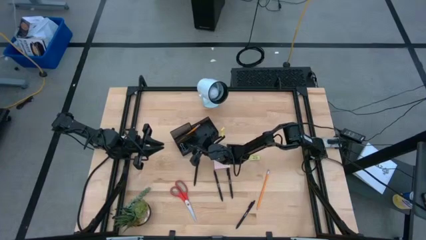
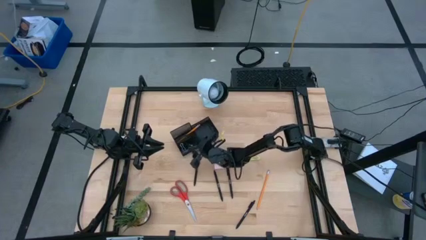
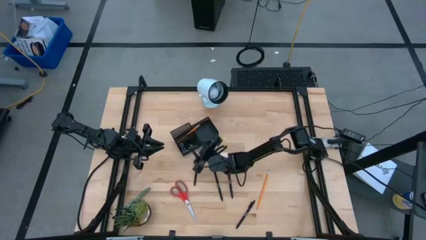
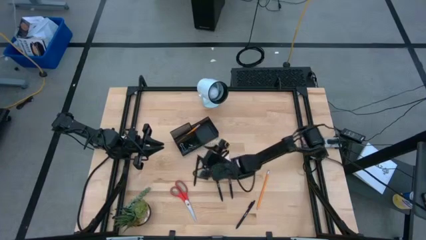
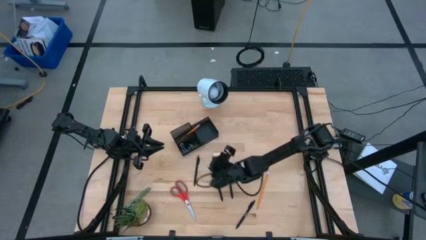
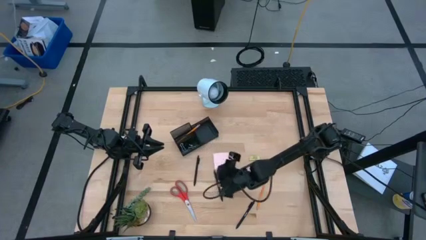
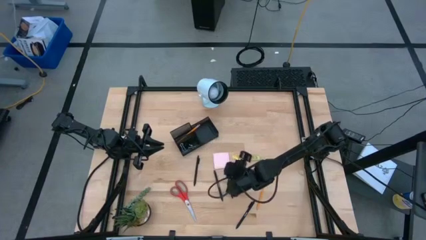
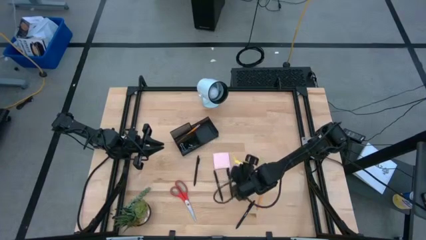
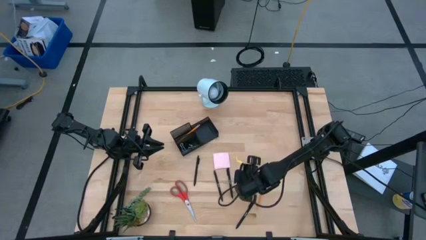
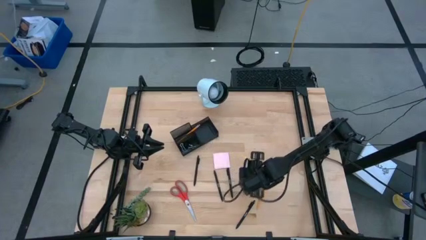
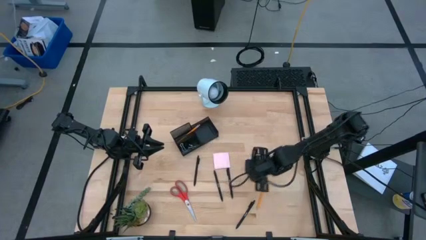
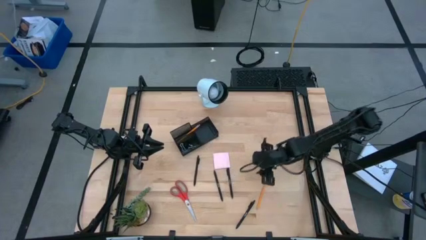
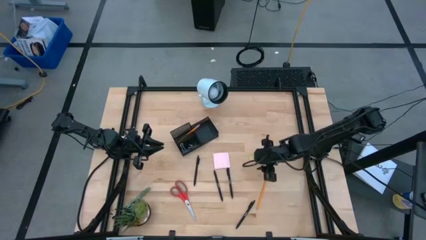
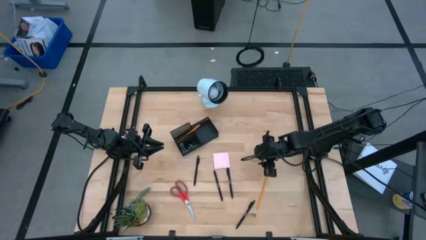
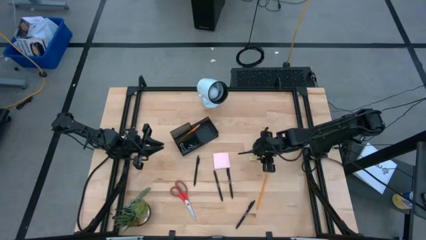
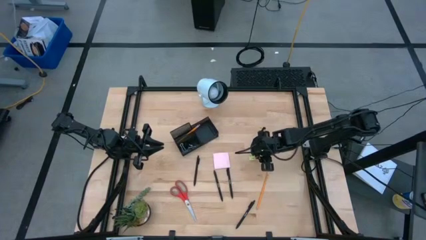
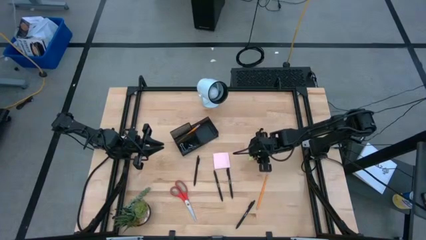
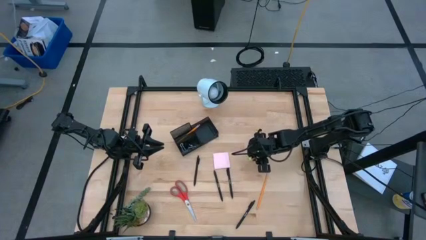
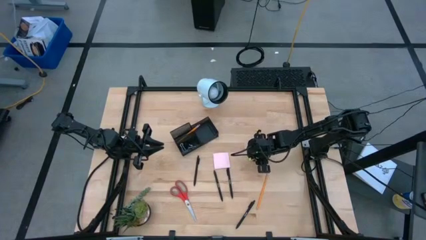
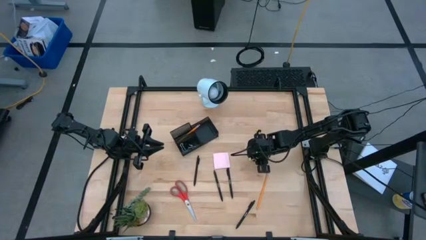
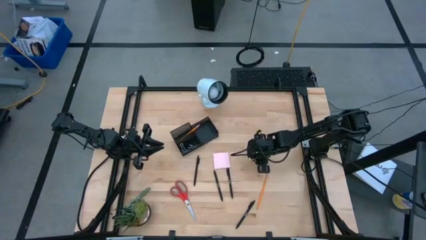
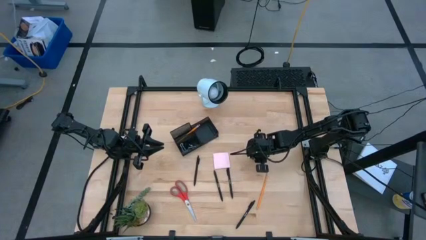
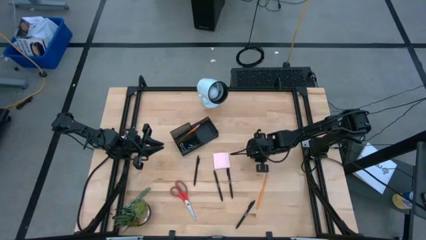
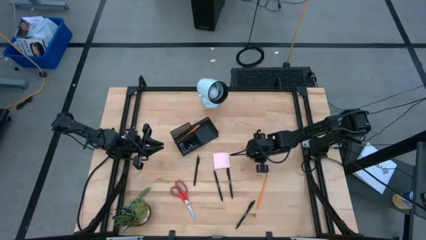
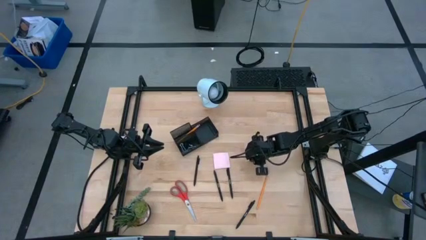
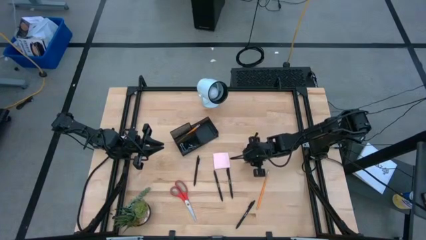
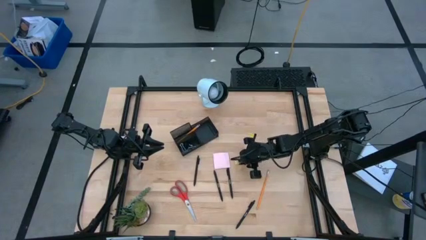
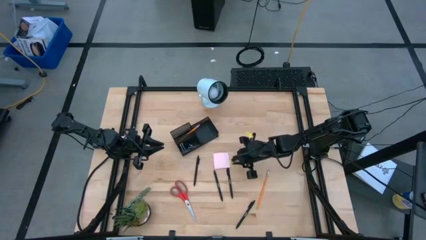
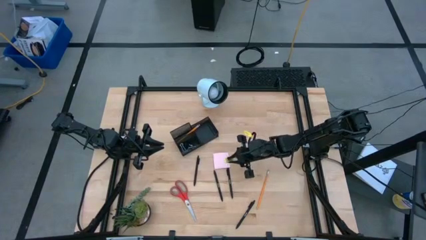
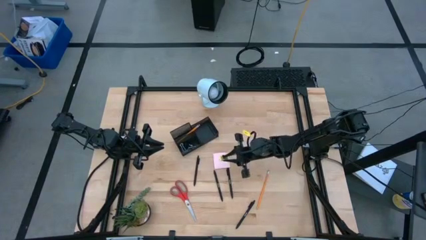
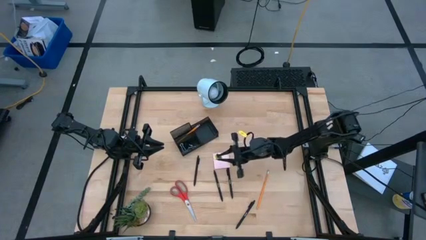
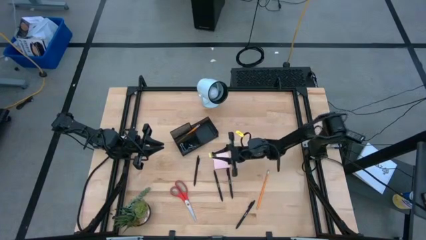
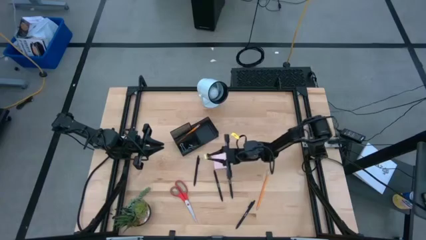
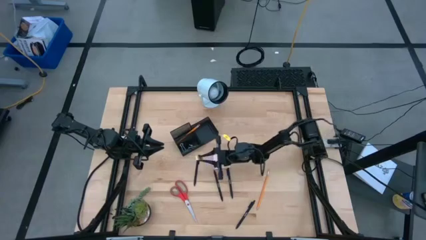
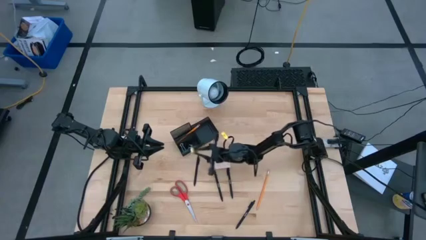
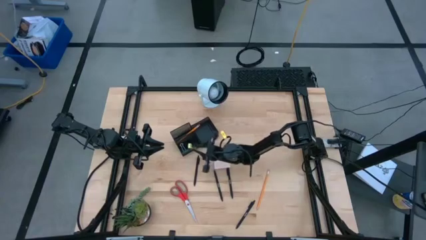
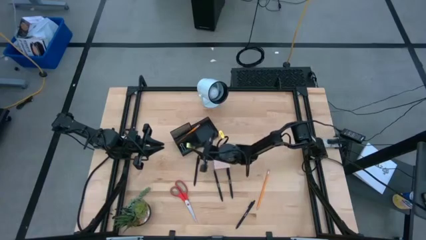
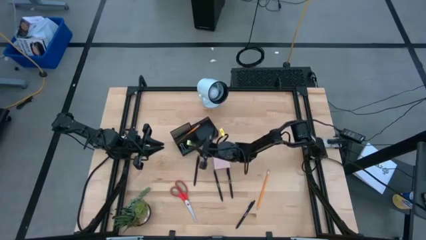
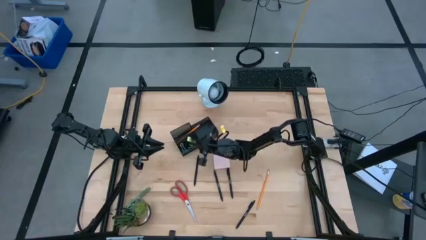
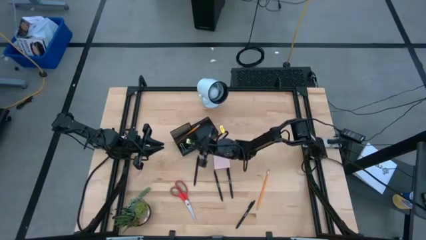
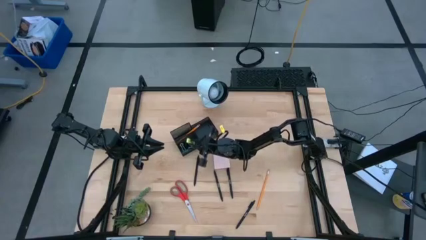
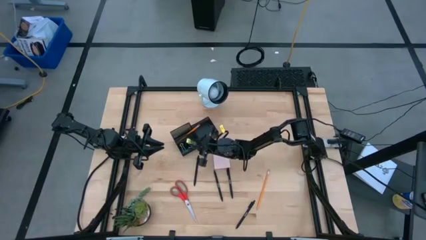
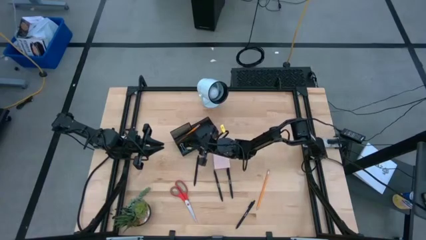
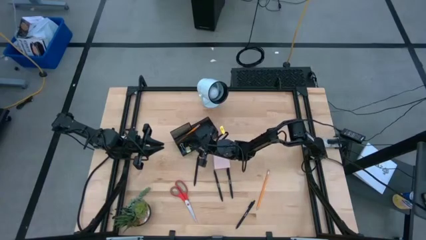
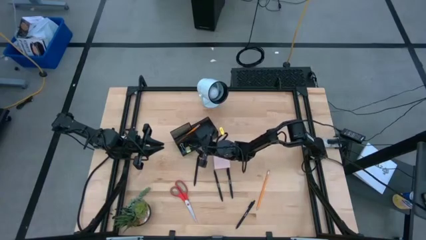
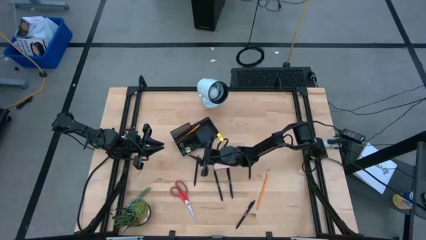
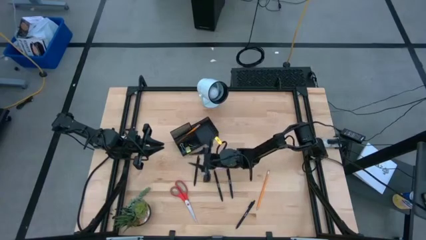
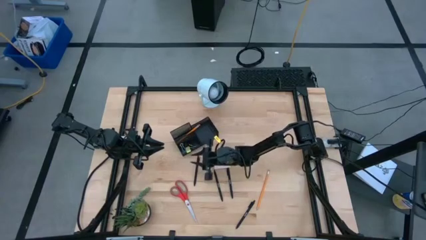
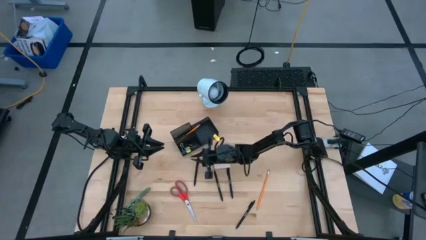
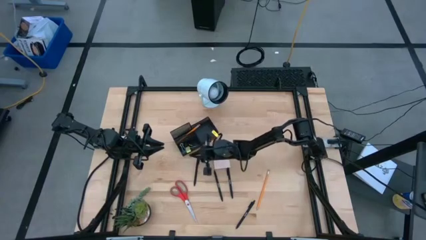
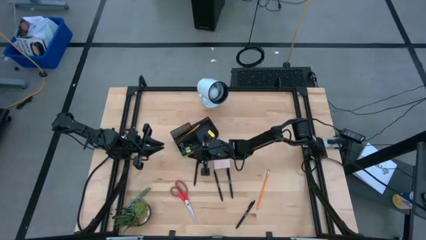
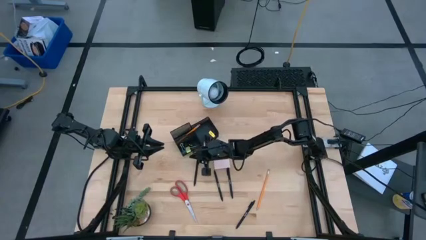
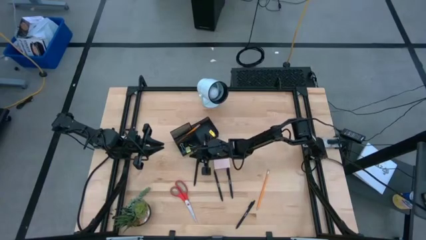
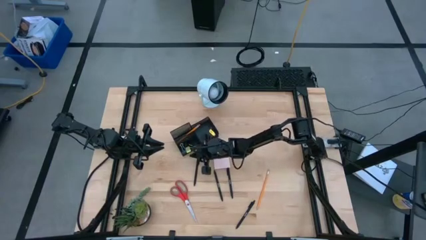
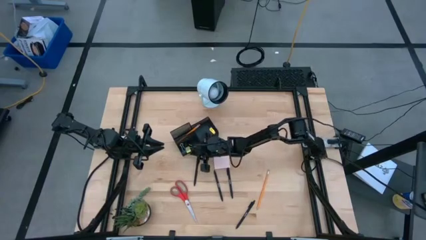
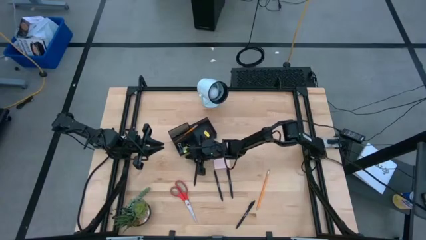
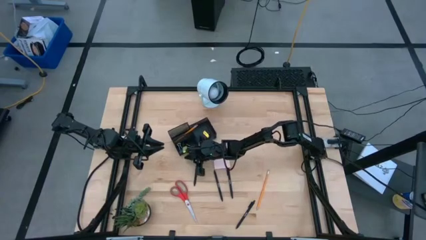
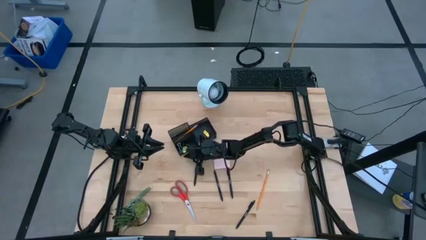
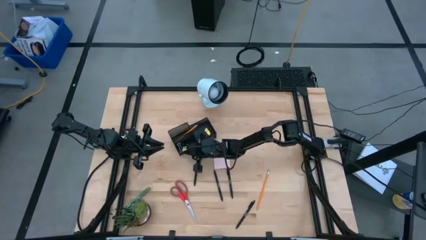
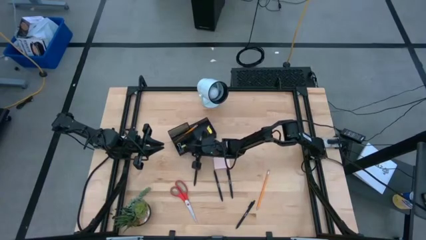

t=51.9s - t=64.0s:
Task: Pick and place office supplies into organizer
Put the green eraser into the black desk organizer

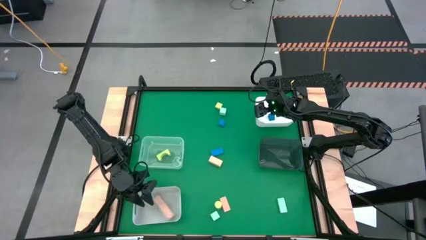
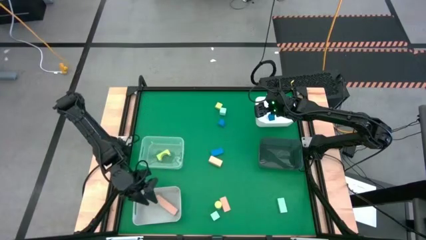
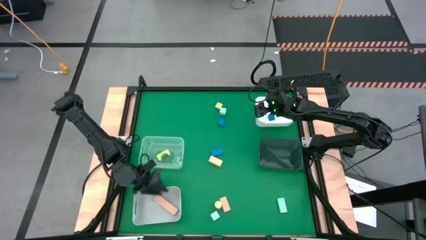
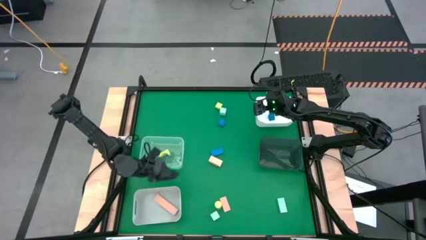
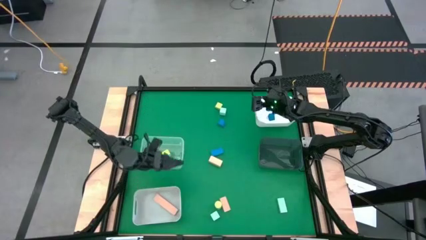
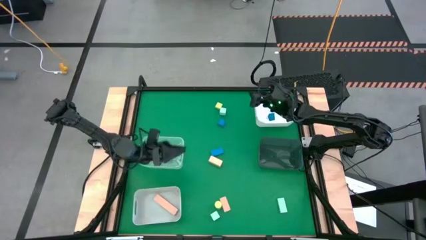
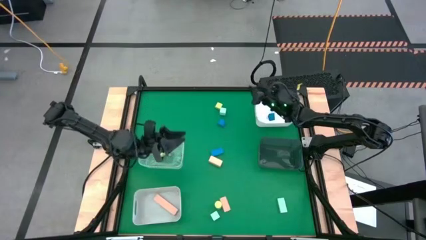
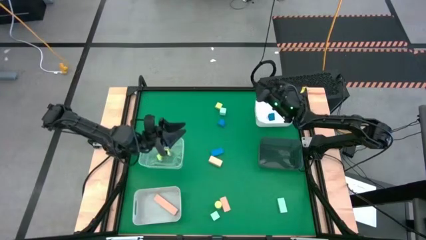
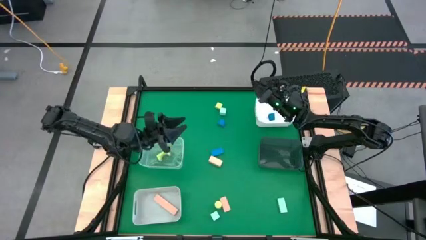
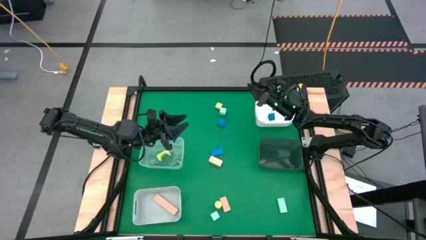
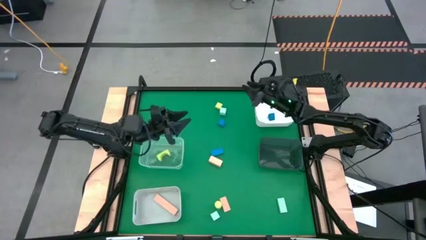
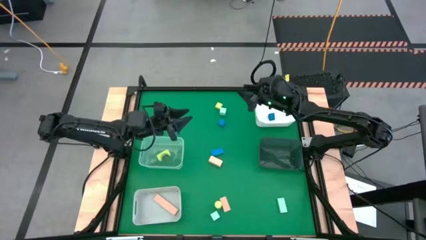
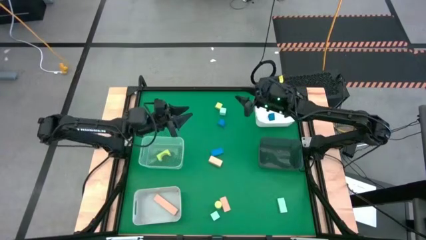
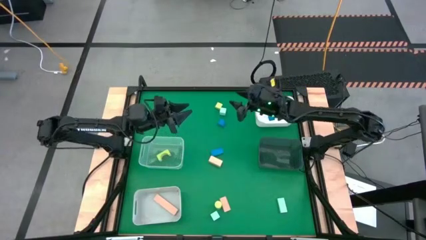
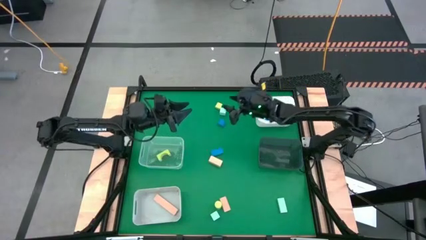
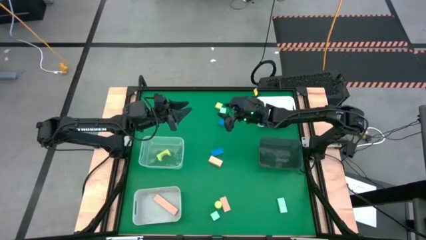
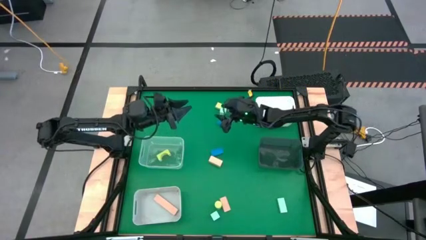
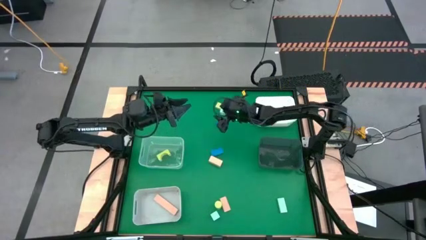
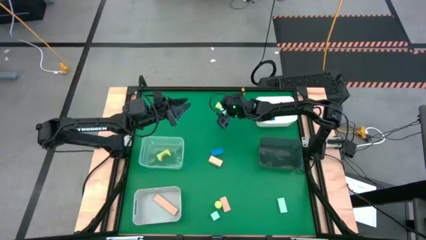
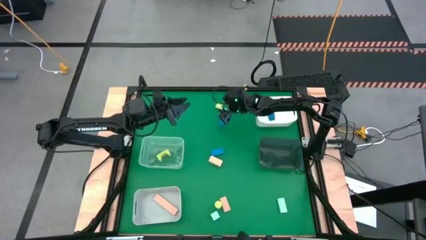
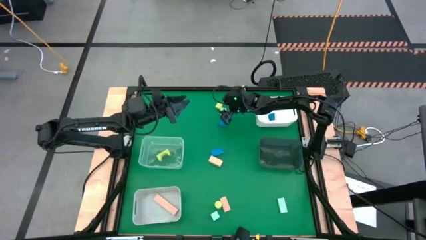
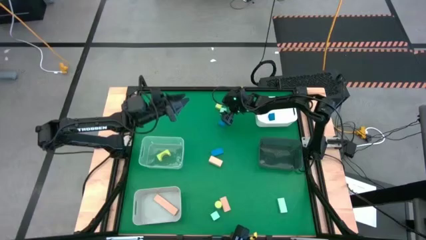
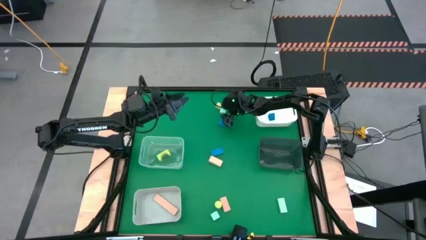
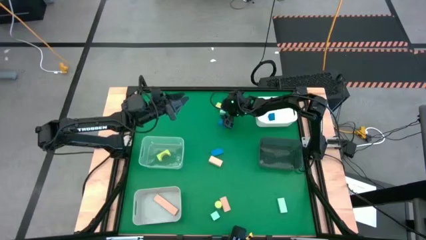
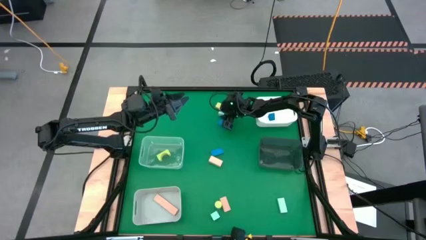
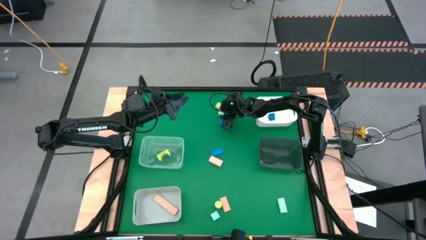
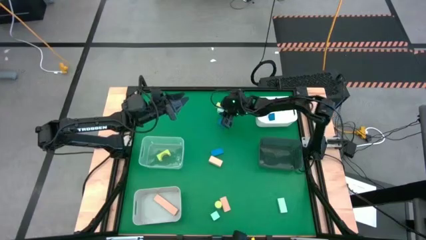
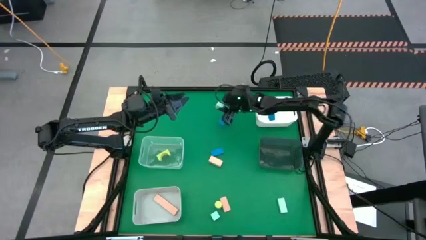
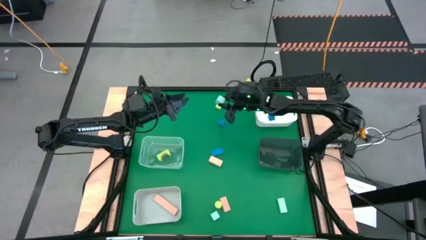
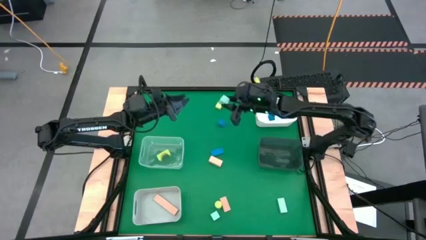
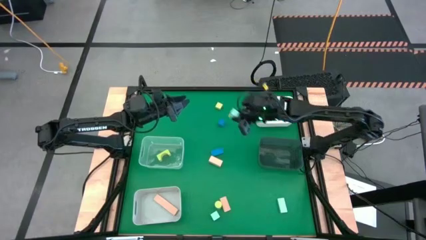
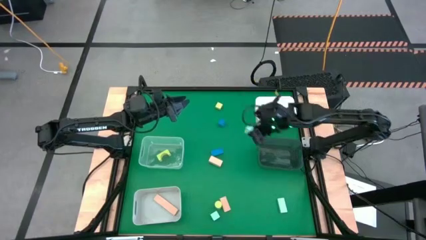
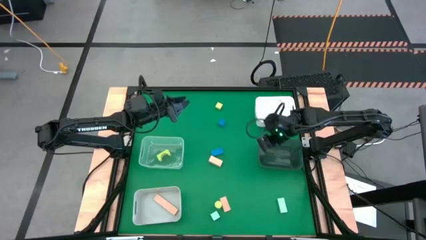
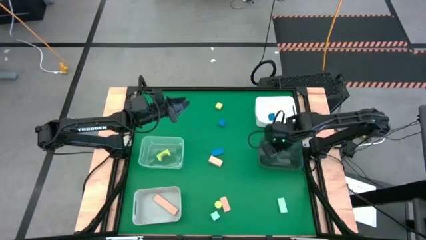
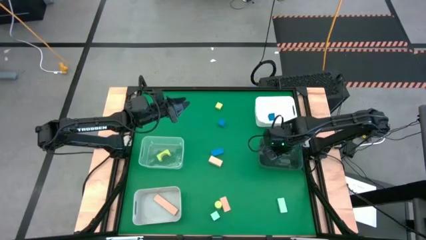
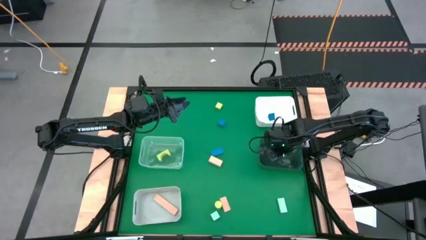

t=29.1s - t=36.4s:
Task: Sort & place blocks by color
Put the light blue block into the black bin
